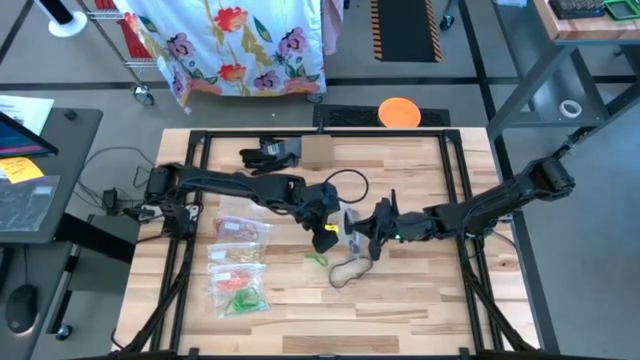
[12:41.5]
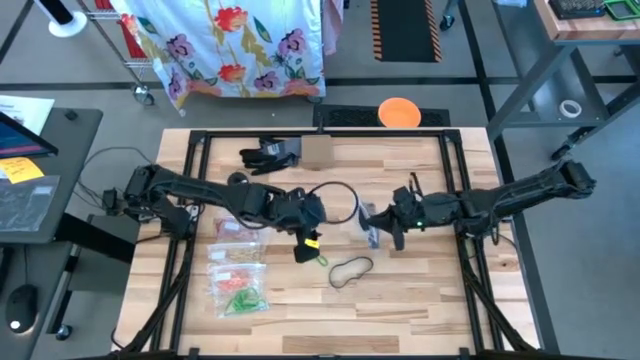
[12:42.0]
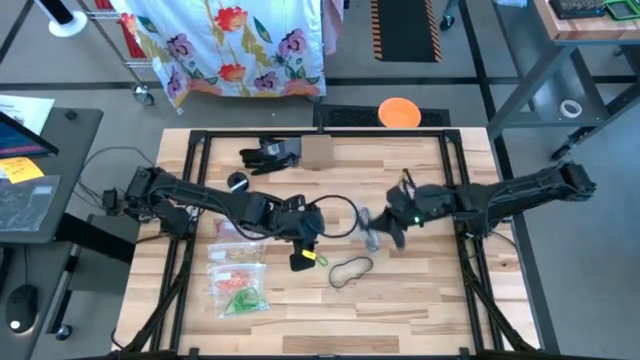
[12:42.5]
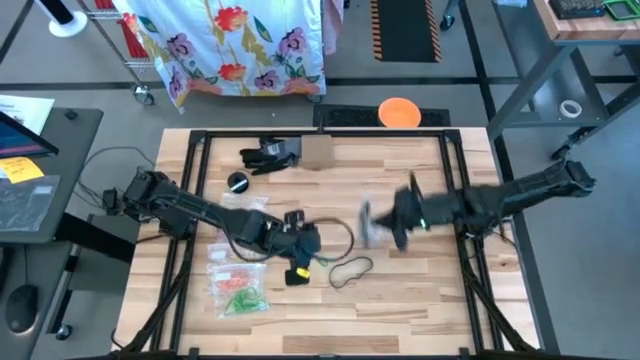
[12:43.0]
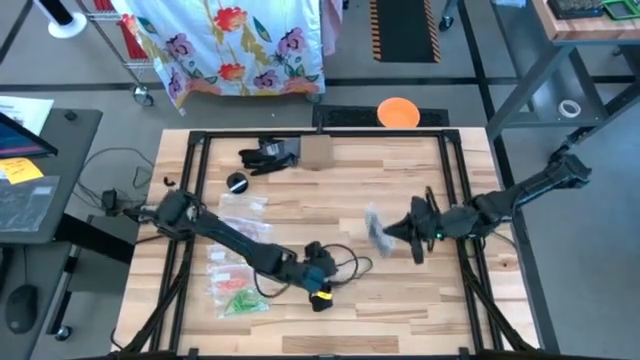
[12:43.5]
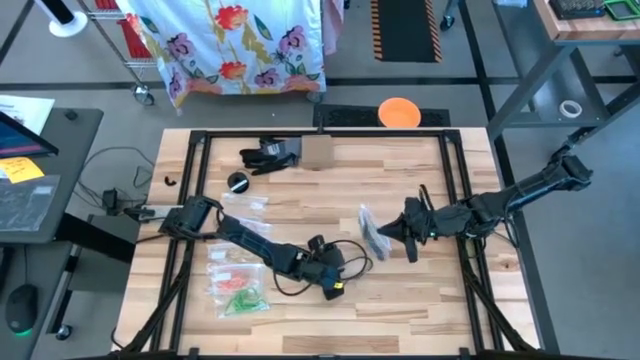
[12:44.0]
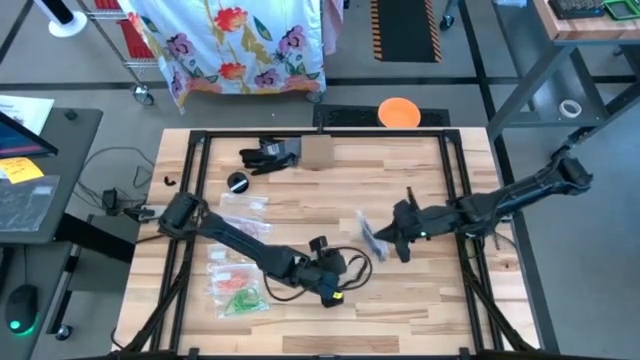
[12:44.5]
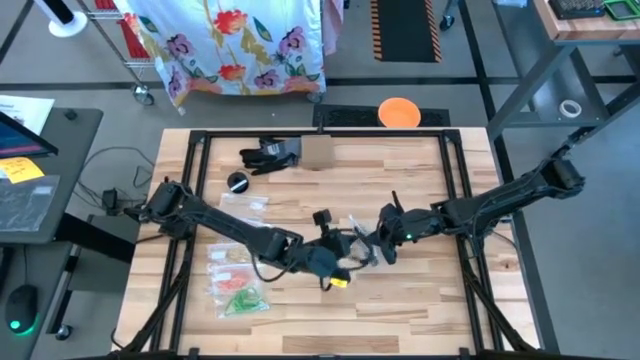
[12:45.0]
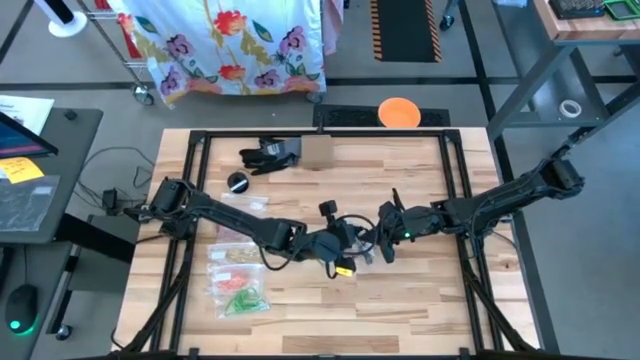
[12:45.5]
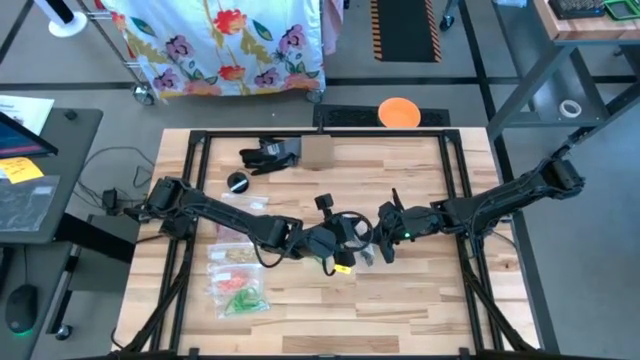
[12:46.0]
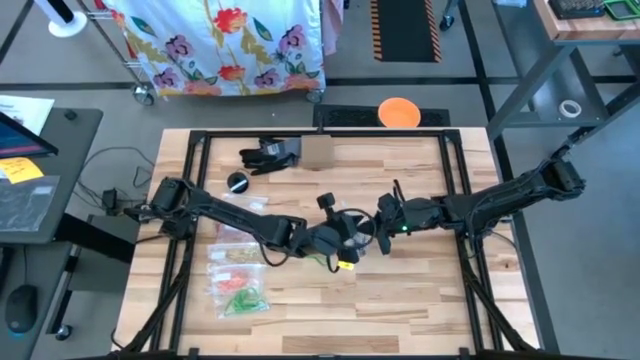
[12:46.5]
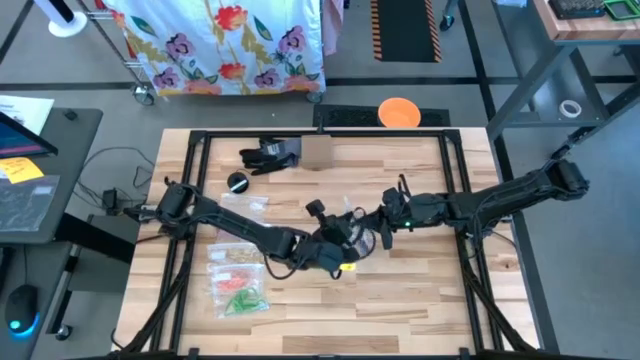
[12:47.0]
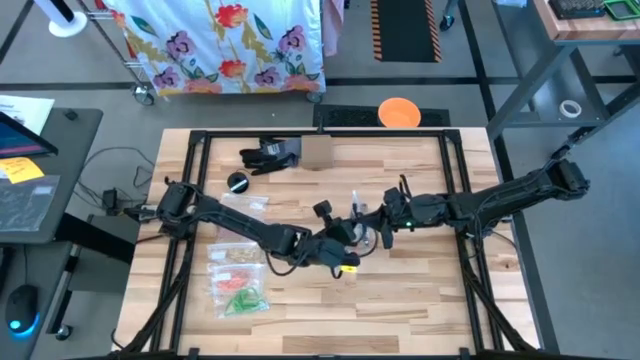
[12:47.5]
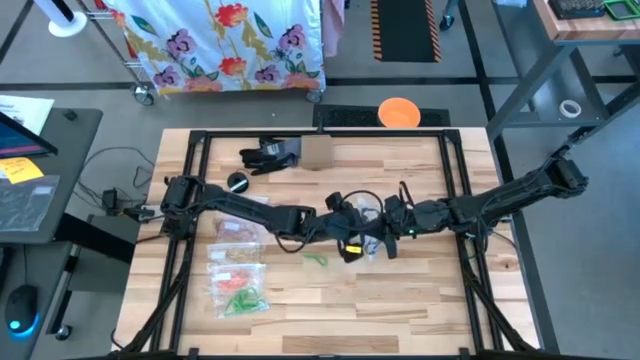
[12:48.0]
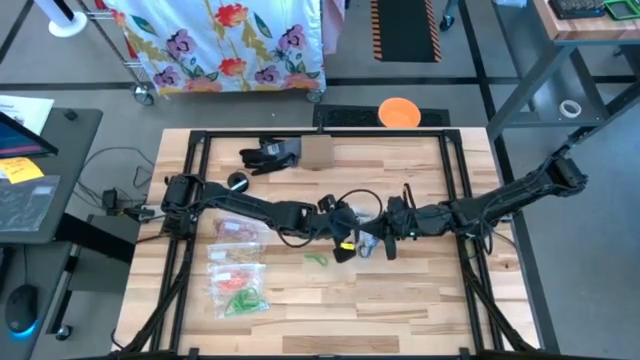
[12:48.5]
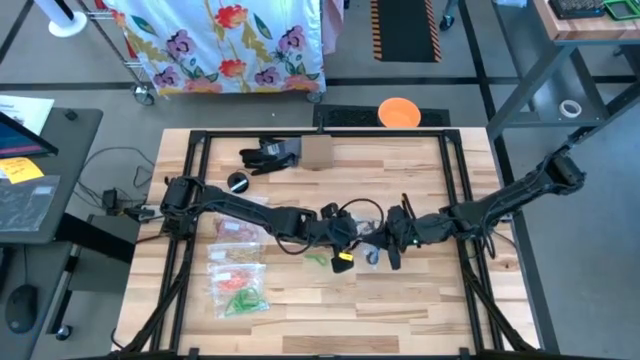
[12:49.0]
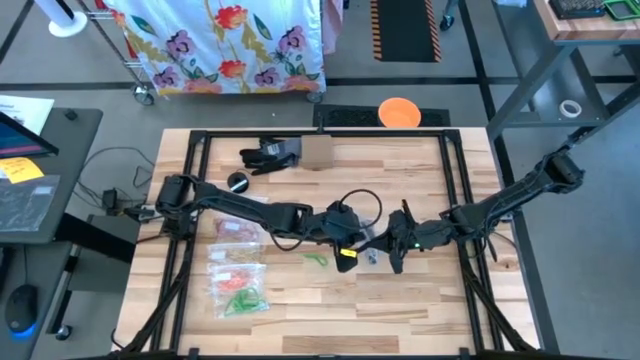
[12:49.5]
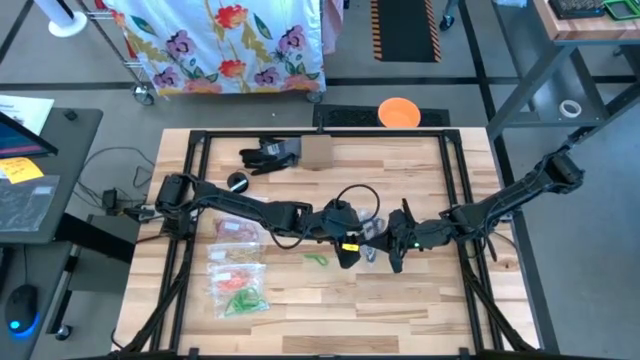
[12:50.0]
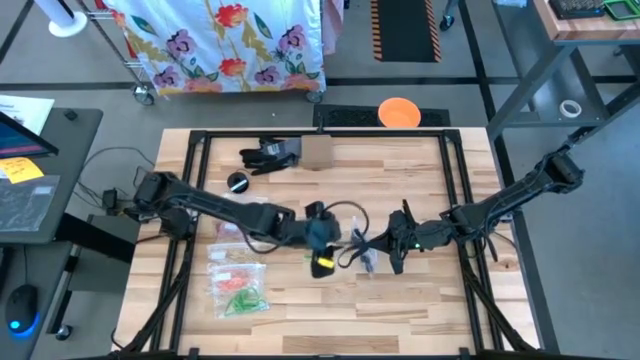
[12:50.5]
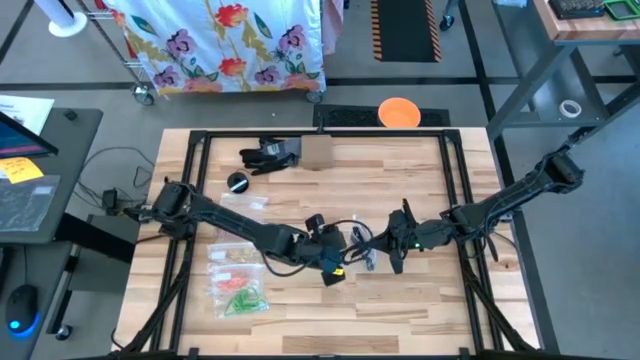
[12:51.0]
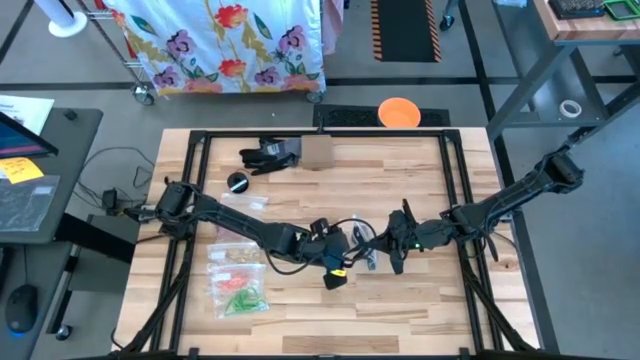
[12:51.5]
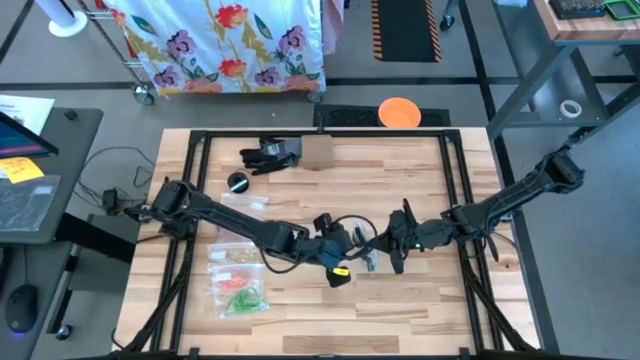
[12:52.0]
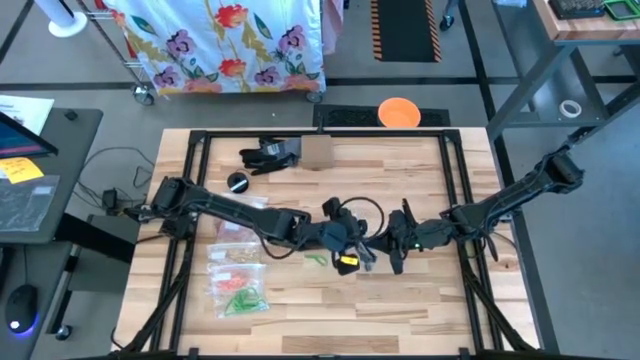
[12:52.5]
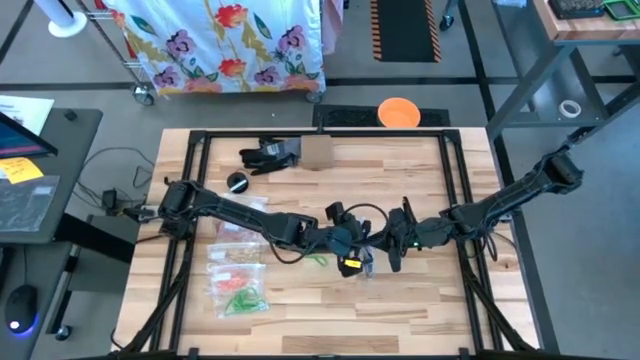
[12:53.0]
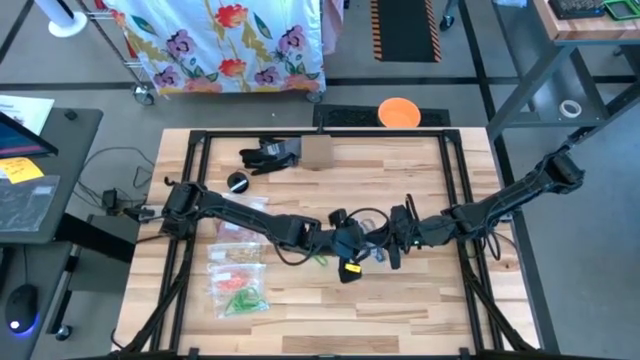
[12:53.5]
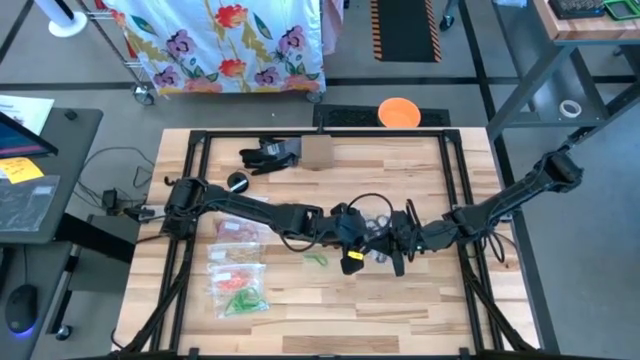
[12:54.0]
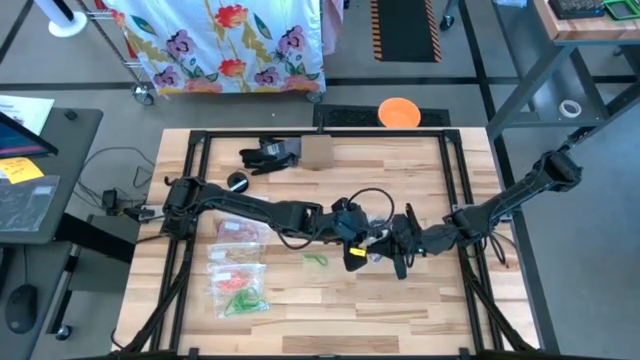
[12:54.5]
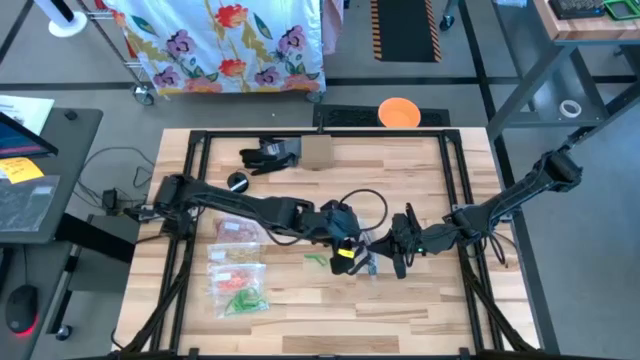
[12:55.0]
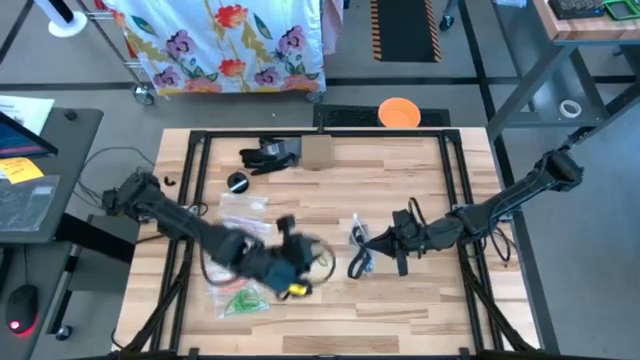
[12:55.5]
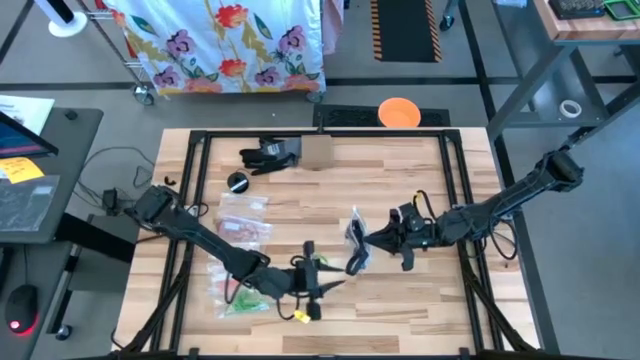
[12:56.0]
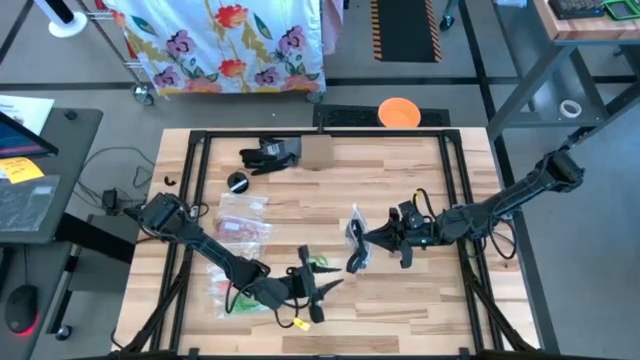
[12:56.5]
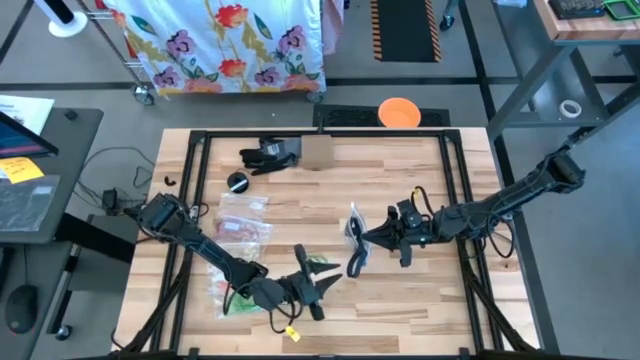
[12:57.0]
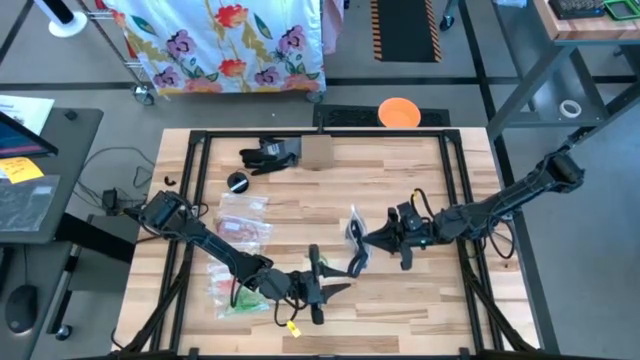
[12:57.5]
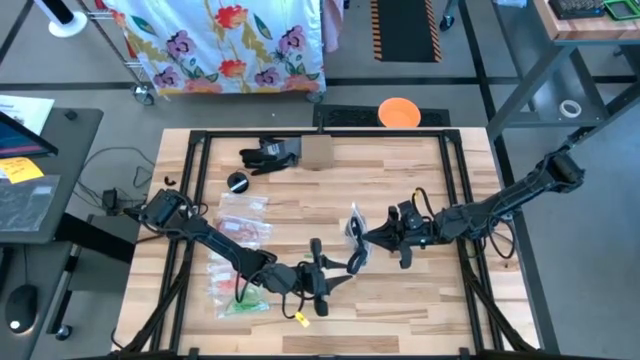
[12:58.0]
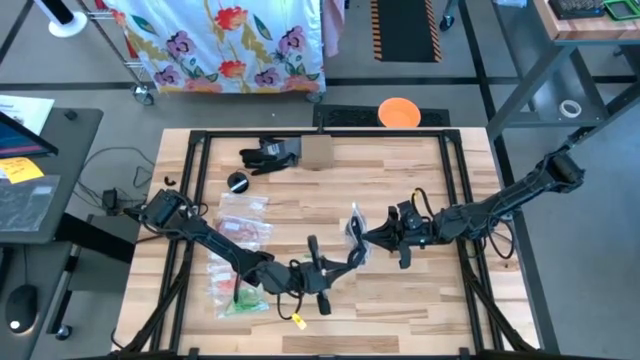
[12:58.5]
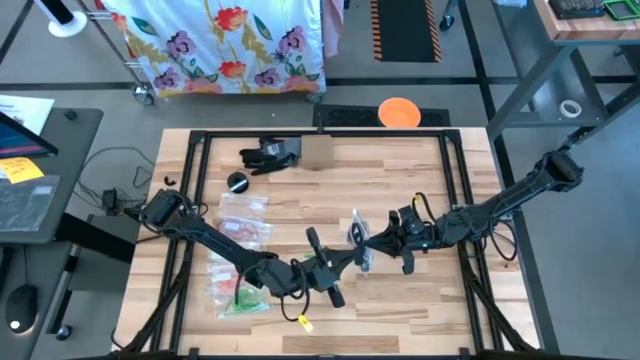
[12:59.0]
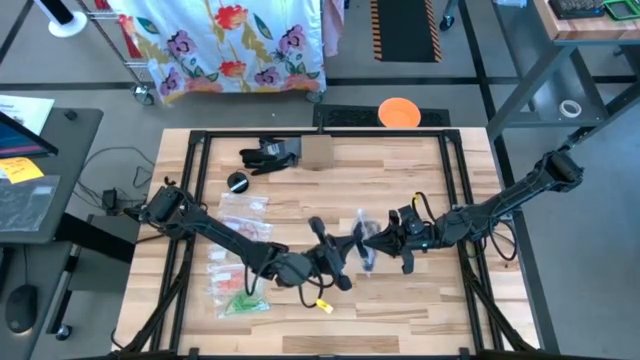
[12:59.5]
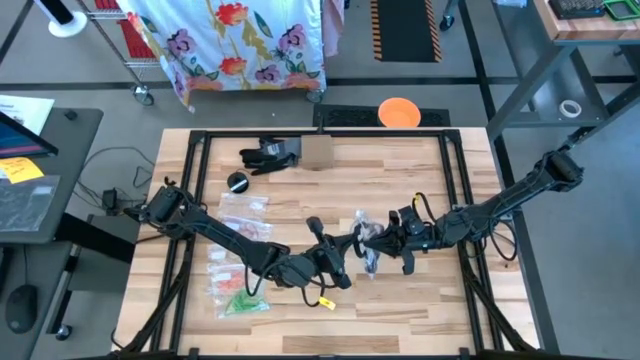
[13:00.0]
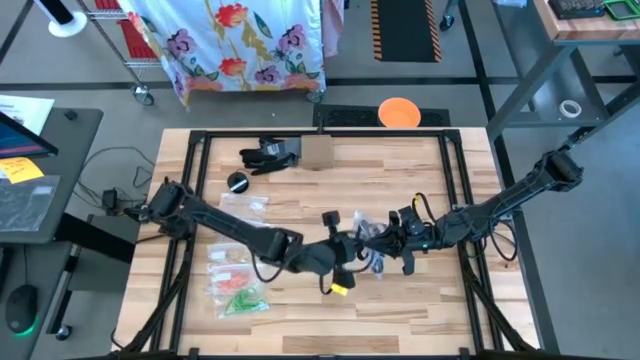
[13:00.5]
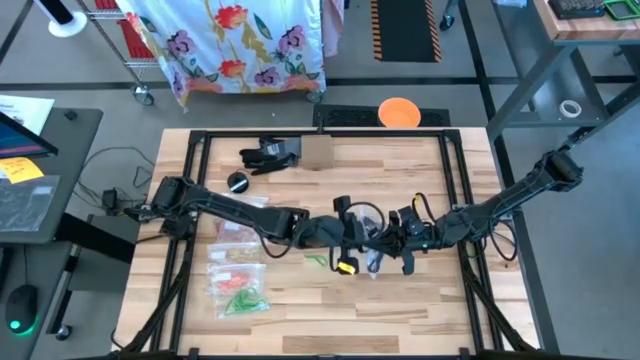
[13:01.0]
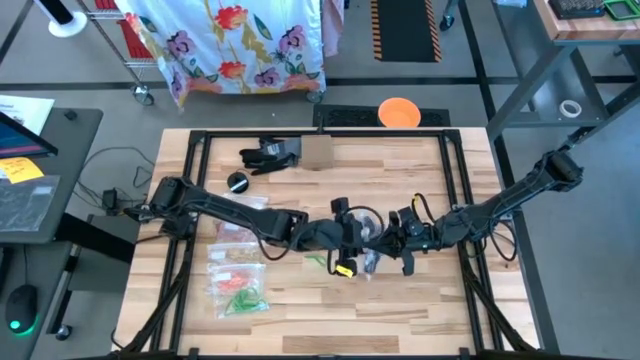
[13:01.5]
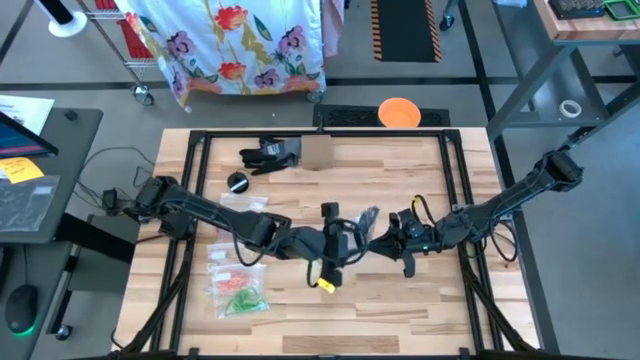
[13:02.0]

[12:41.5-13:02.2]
Task: Sort rubber bands
Put the black rubber band into the transparent zip bag
